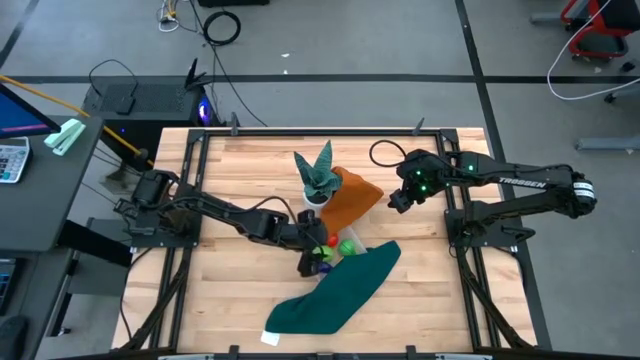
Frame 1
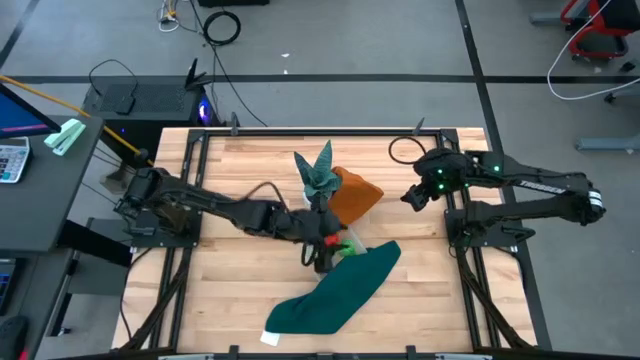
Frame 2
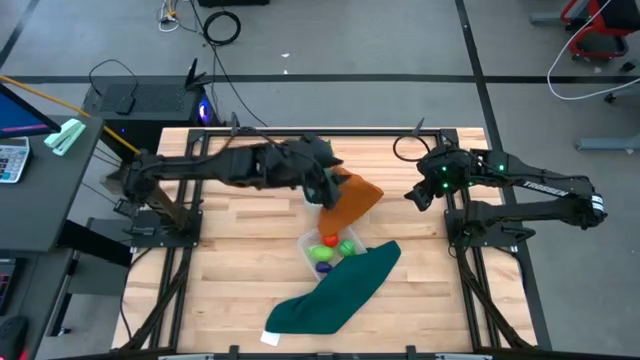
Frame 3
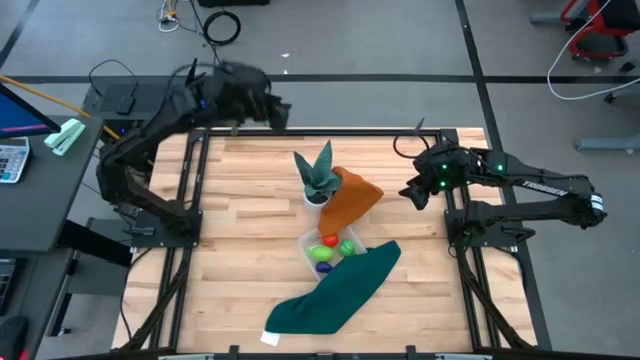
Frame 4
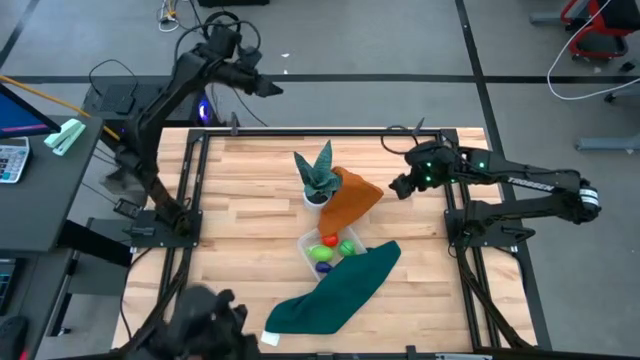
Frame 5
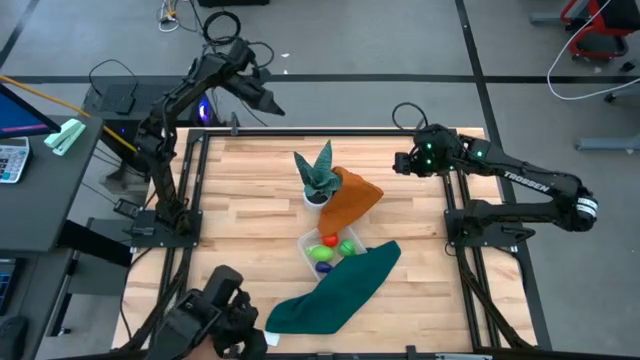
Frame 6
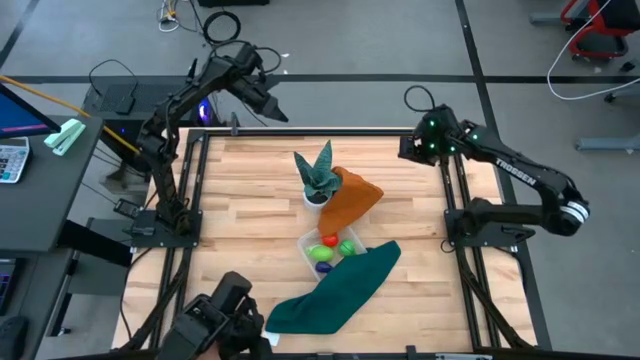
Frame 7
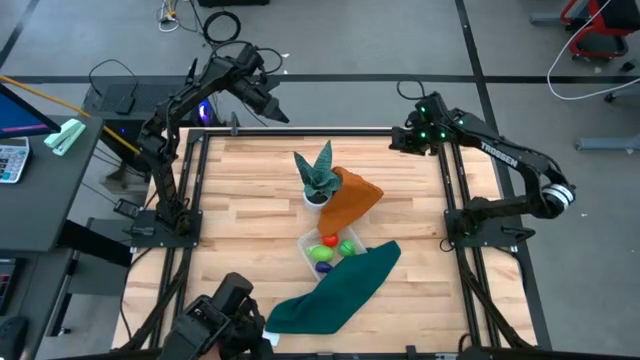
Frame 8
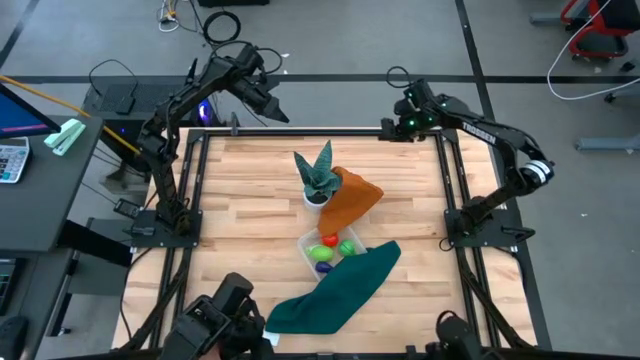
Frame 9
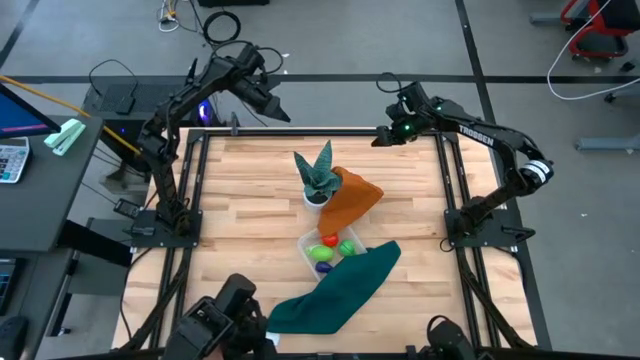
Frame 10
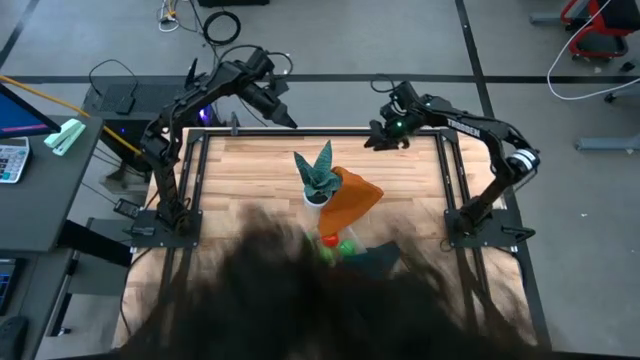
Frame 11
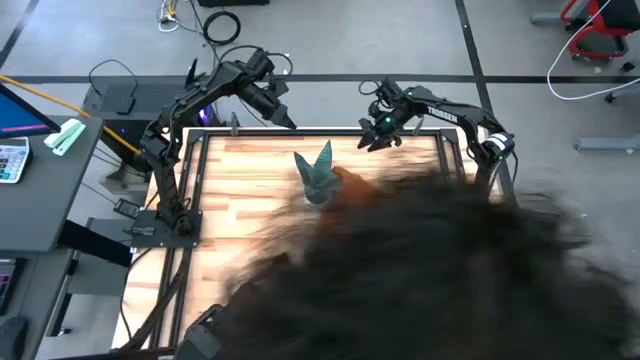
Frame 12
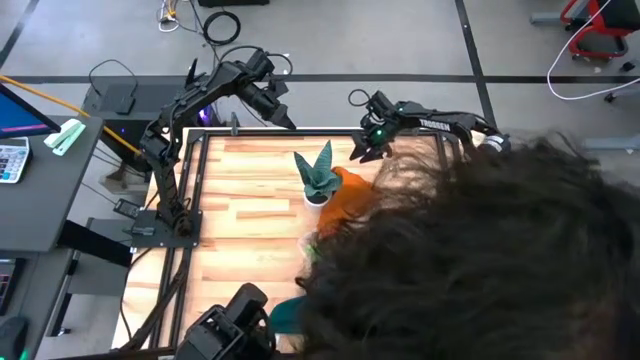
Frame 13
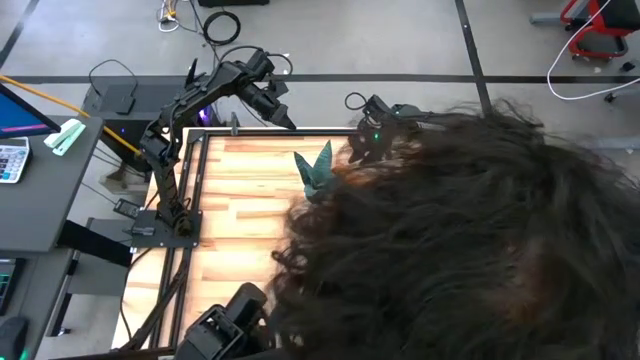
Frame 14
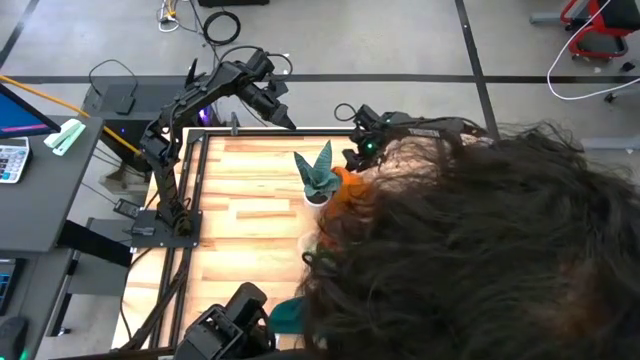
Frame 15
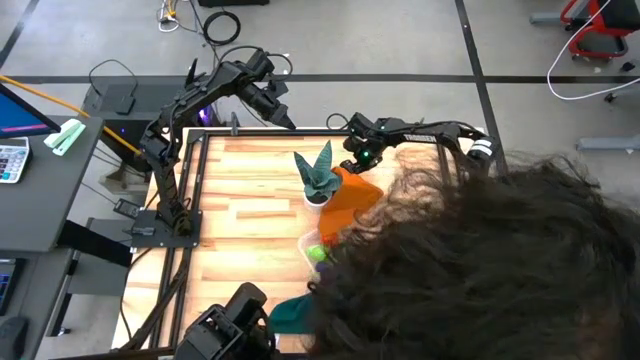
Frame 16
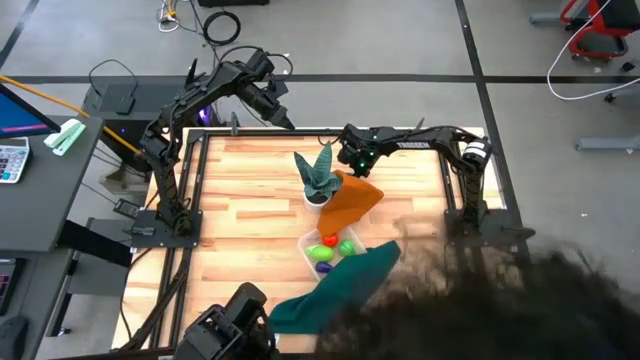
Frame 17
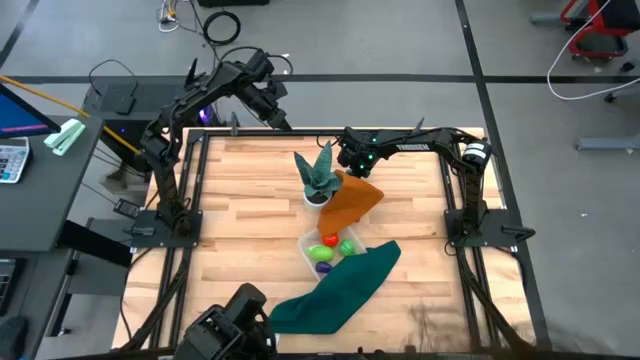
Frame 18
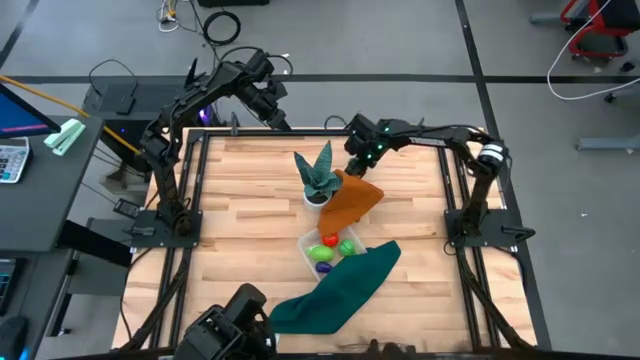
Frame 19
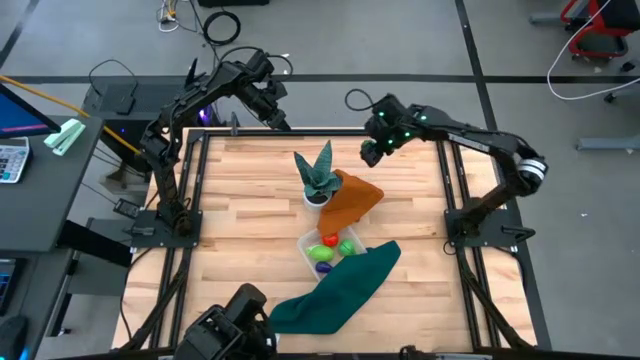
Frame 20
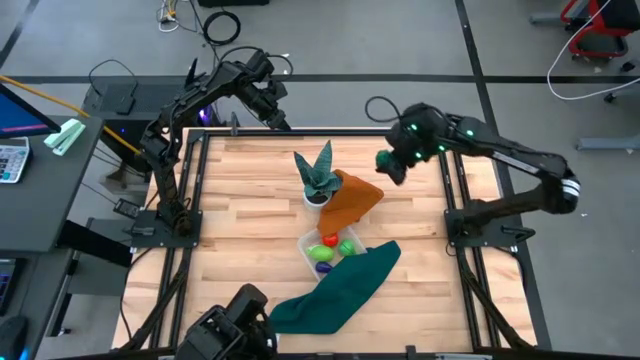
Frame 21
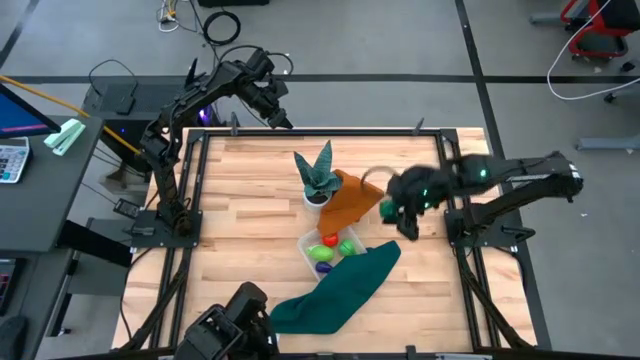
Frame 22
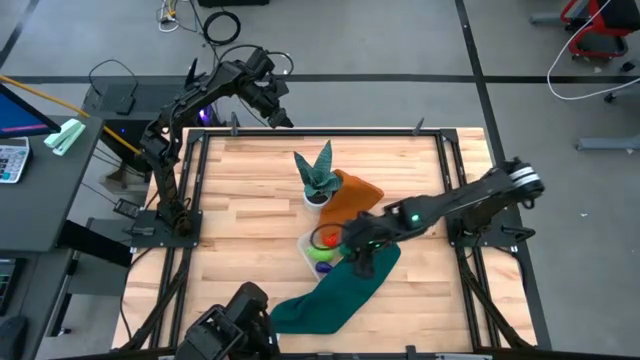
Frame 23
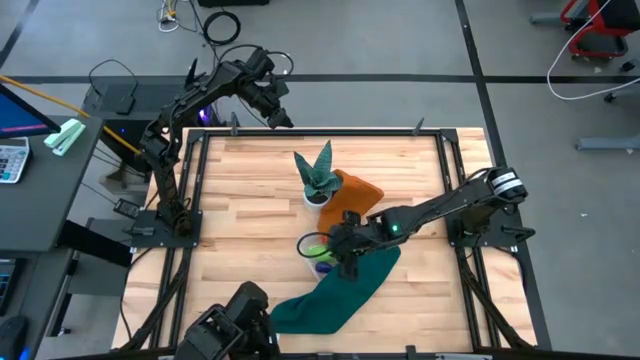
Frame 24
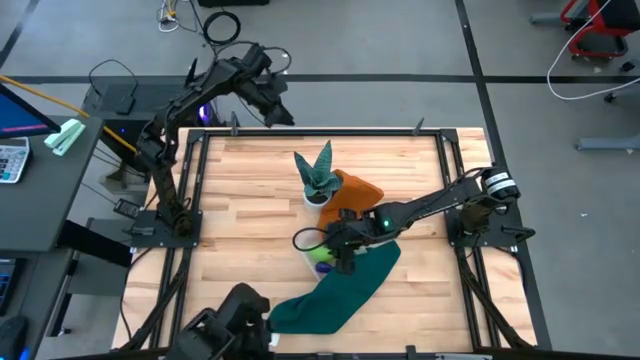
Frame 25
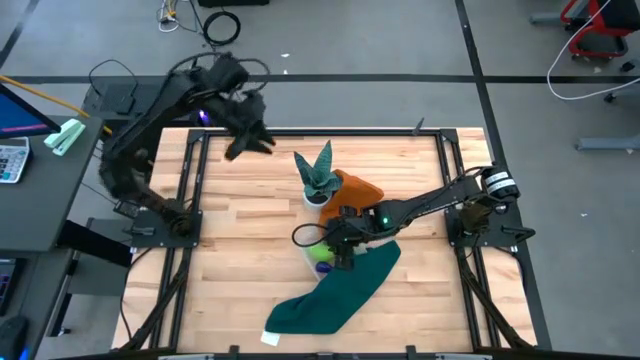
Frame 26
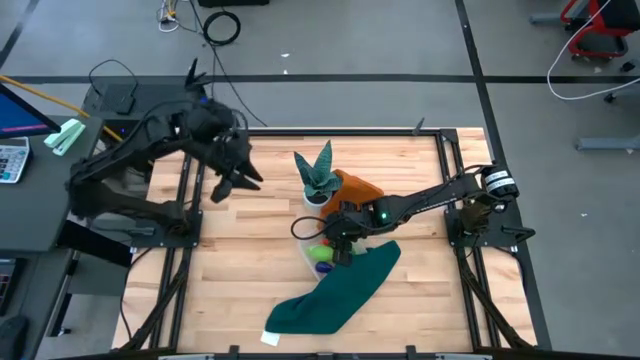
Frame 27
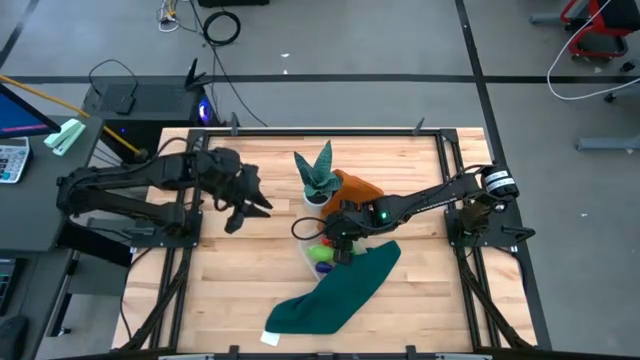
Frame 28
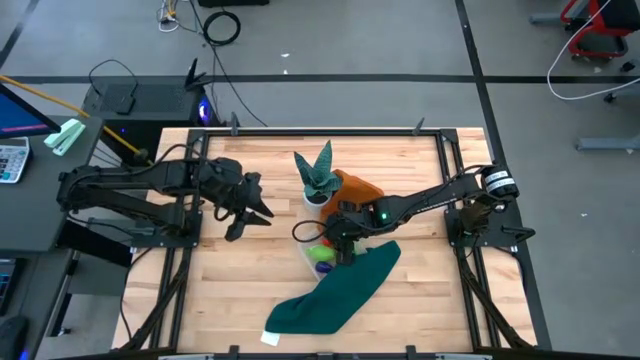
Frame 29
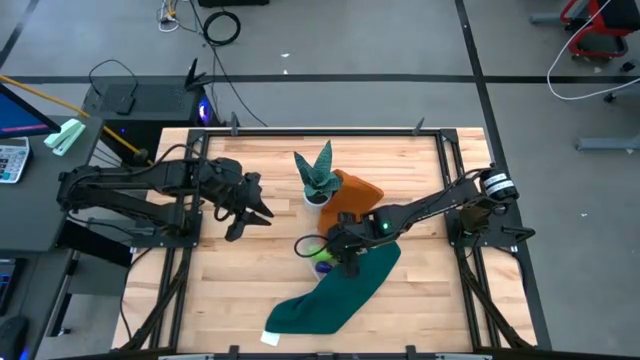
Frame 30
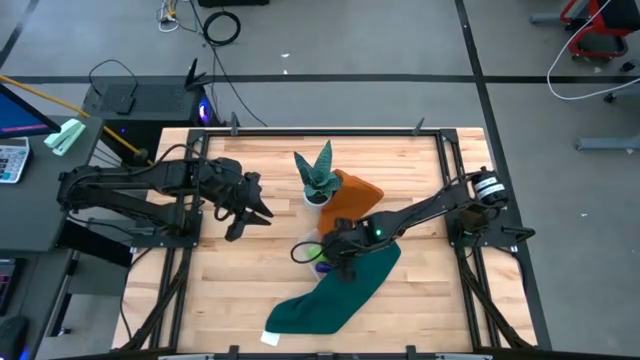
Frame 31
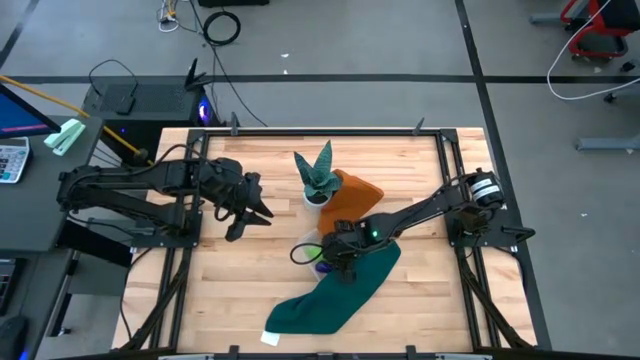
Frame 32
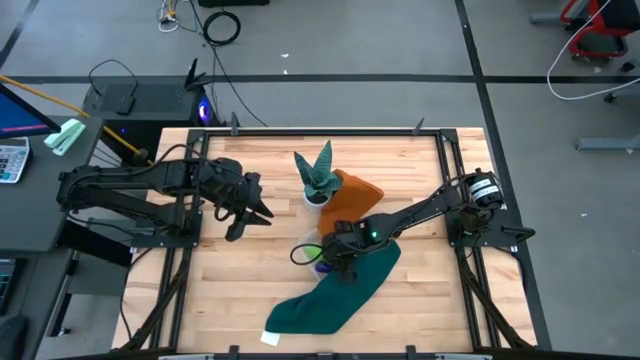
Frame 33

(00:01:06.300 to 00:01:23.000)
Task: Pick and placing Produce into tupperware
Put the green bell pepper into the transparent bin

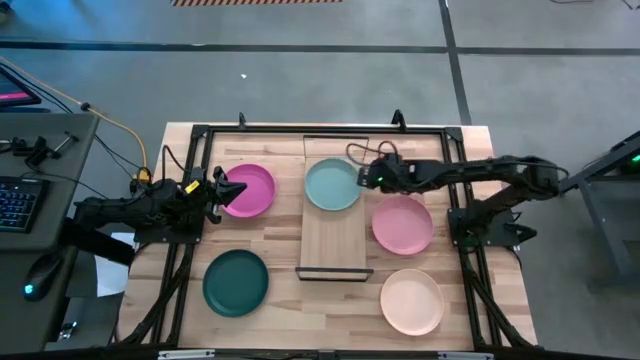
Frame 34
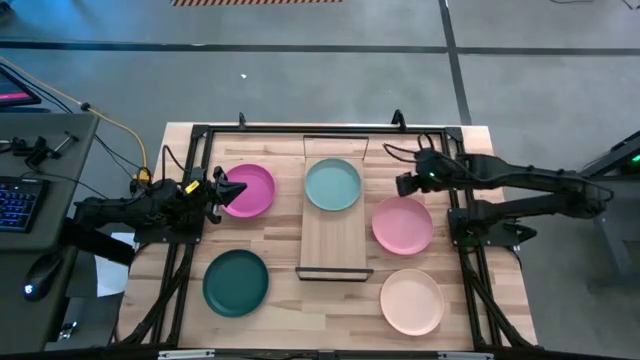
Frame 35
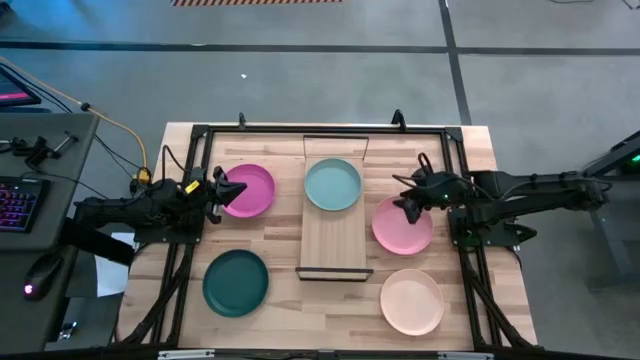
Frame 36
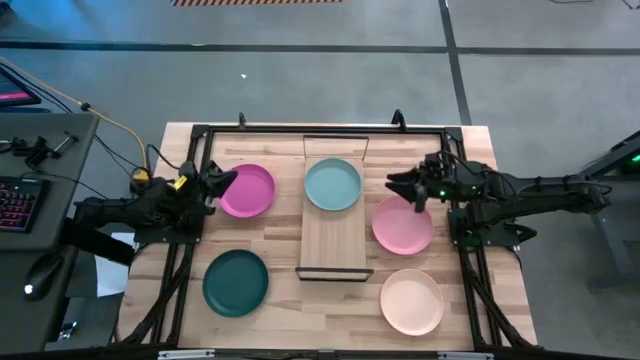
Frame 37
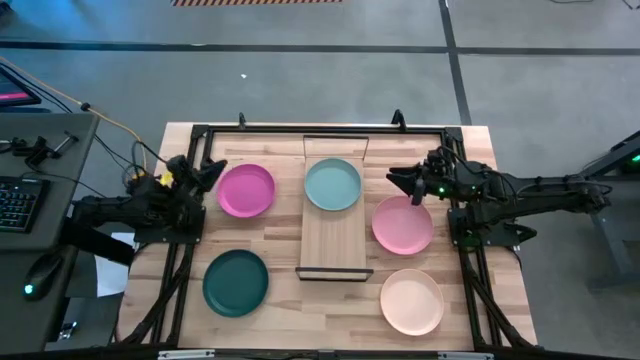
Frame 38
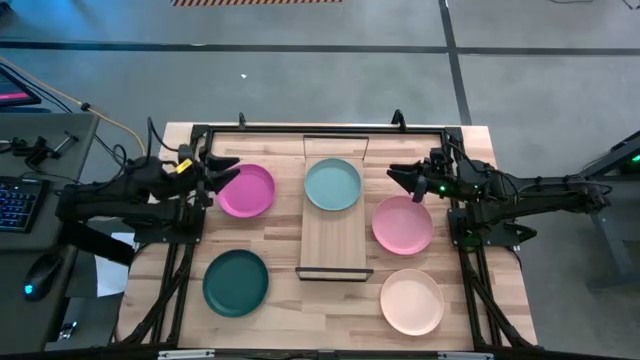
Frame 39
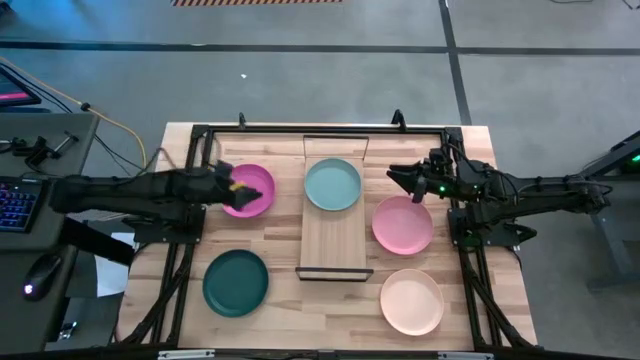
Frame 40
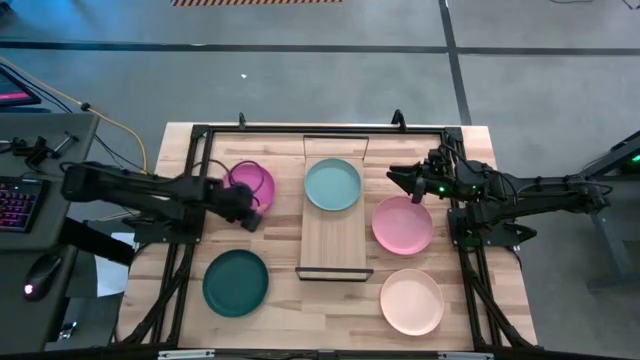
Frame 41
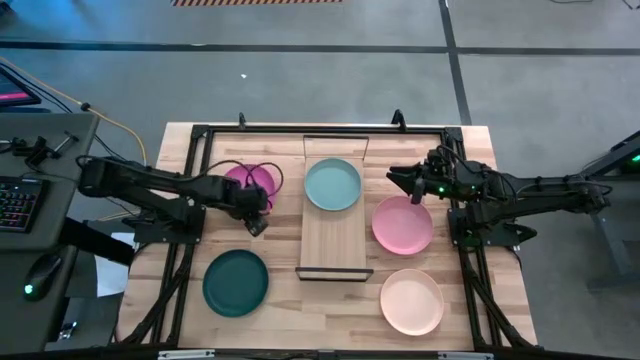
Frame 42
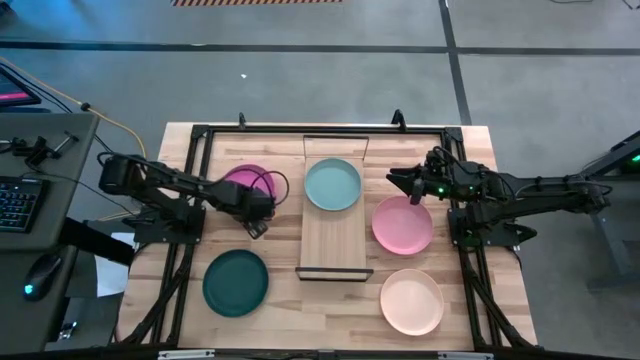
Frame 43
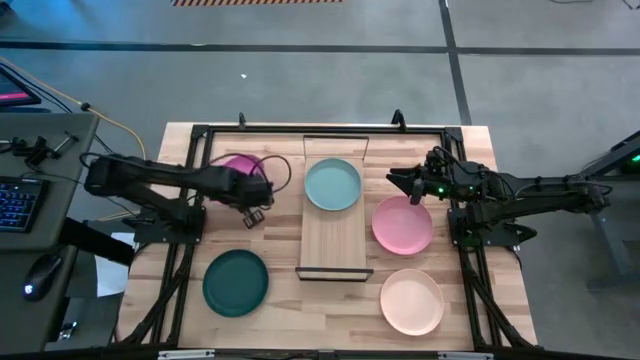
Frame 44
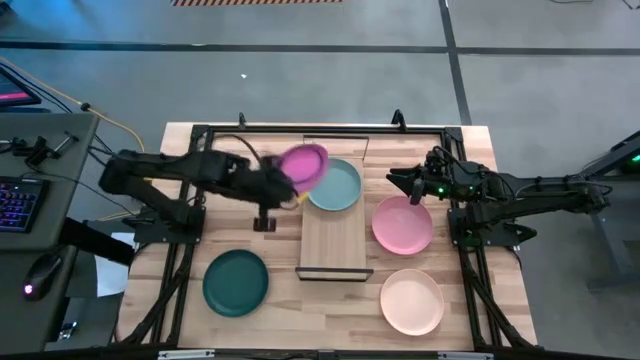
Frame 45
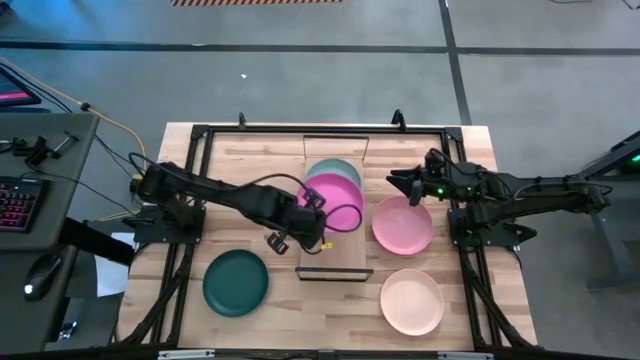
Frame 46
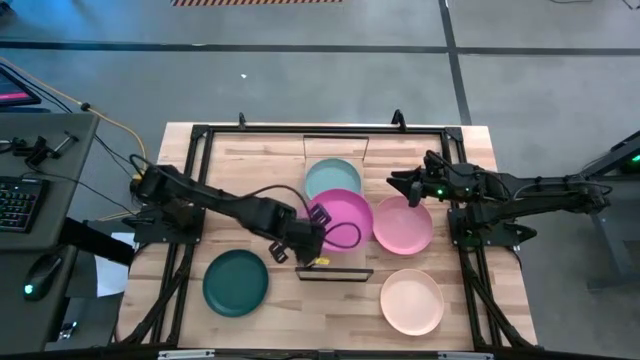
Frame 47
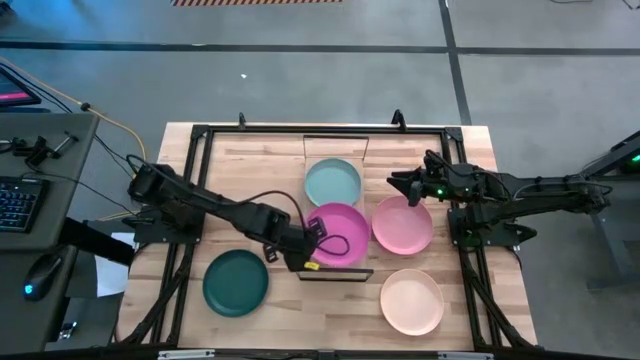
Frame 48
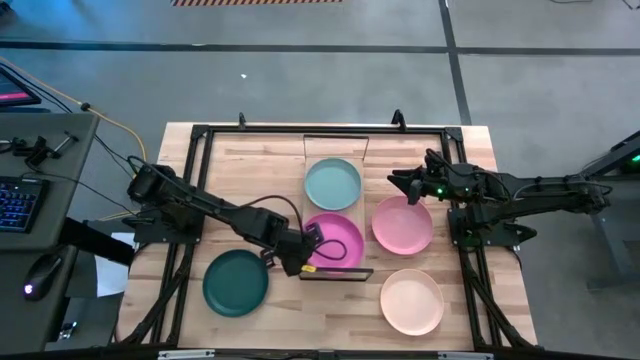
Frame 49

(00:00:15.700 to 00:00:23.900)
Task: Place and stack plates onto a shelf
Put the pink plate on the shelf
